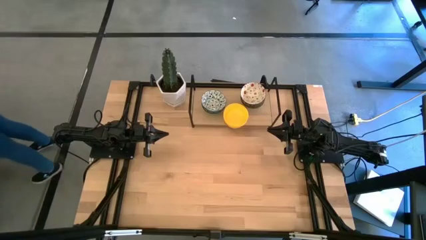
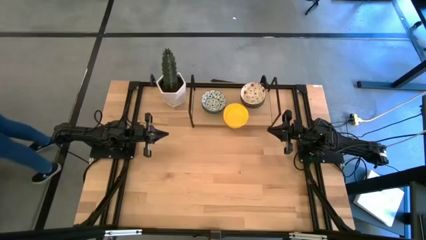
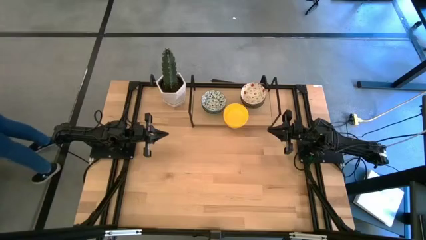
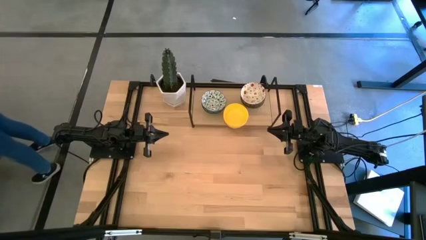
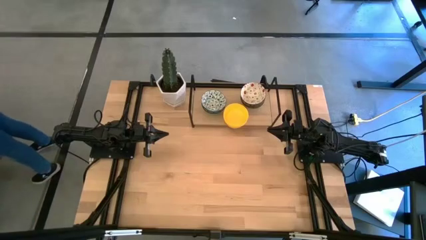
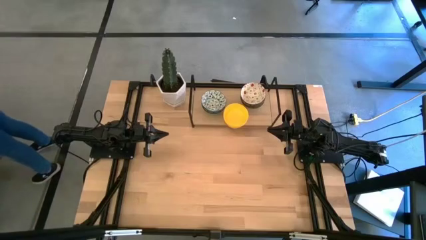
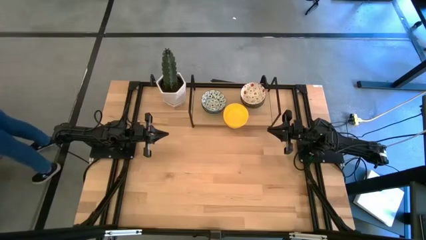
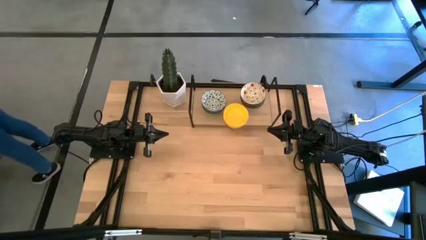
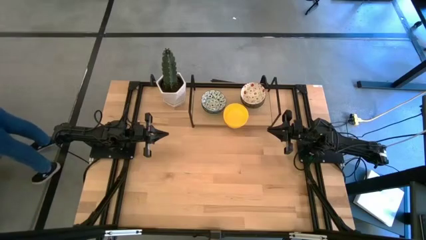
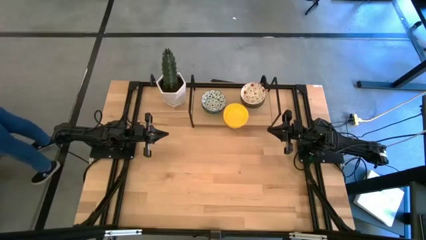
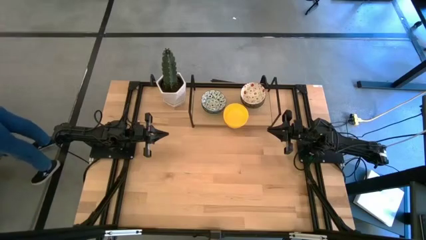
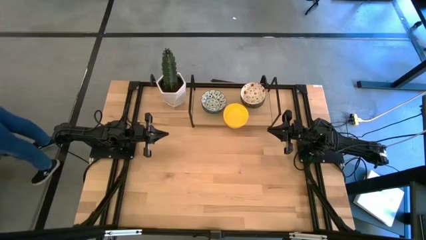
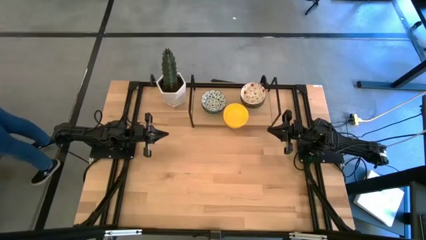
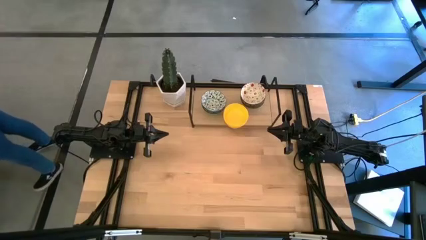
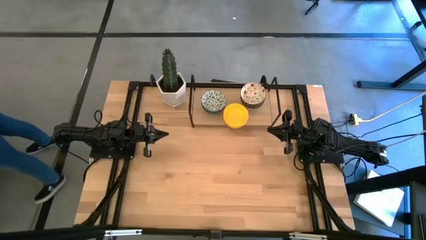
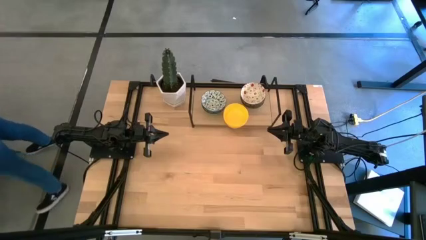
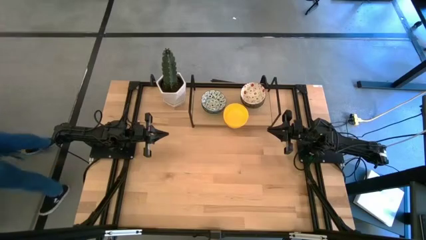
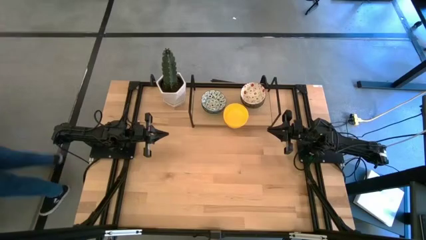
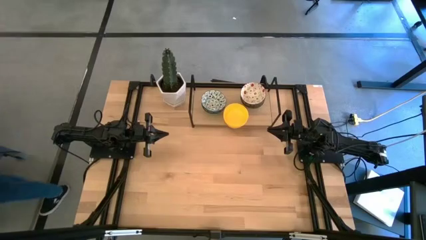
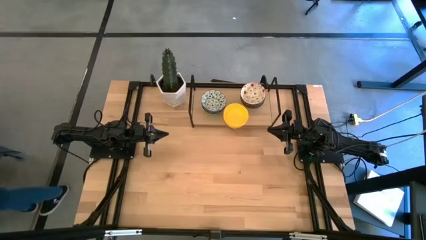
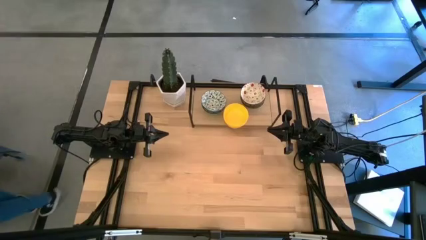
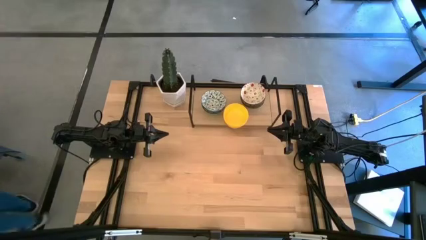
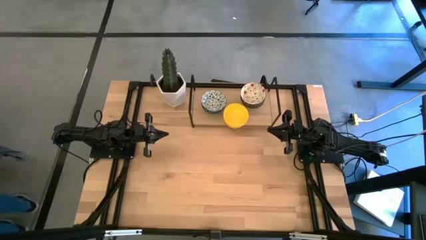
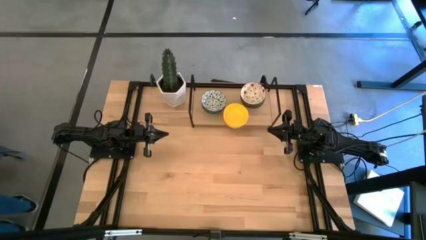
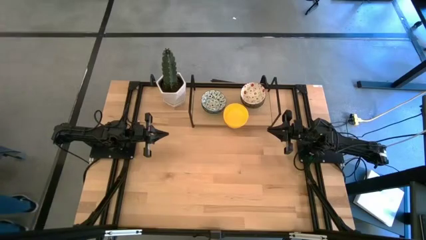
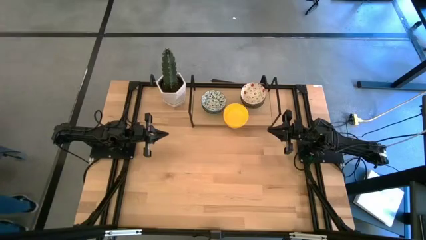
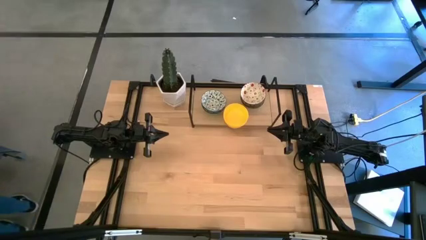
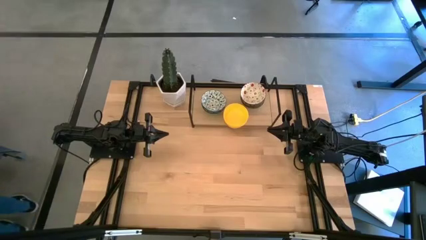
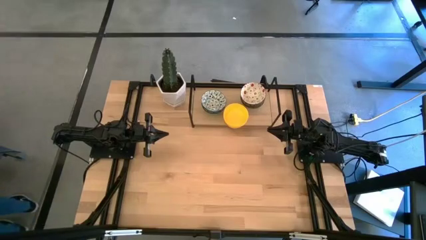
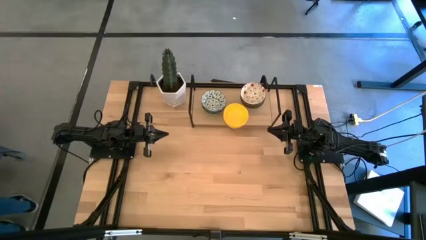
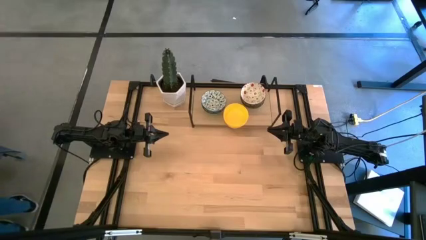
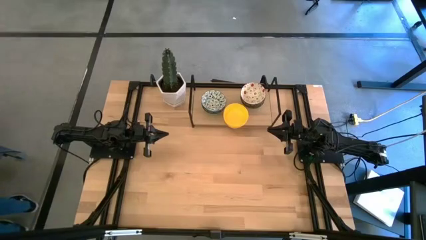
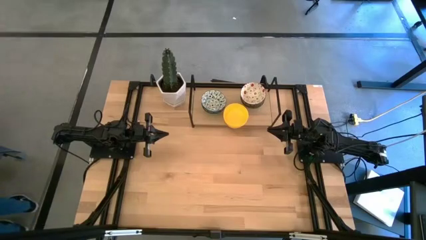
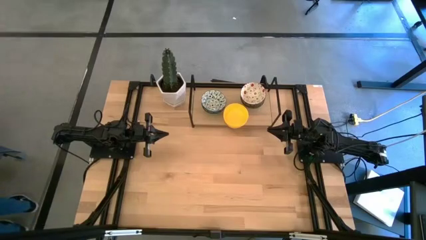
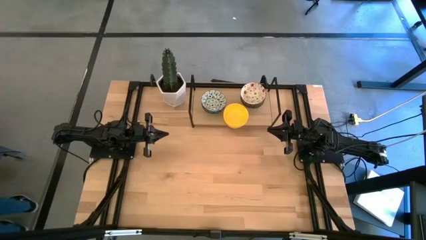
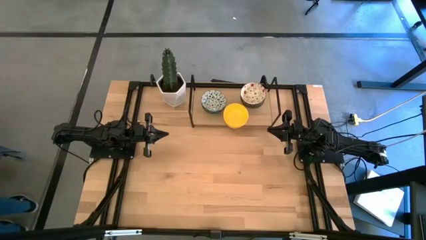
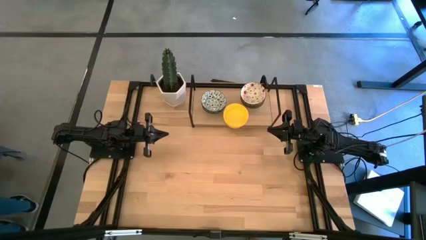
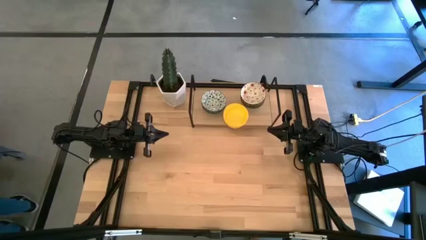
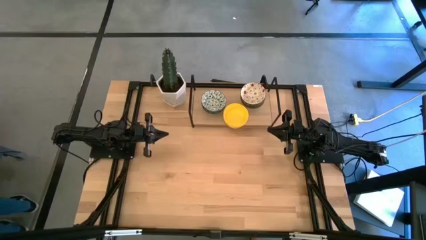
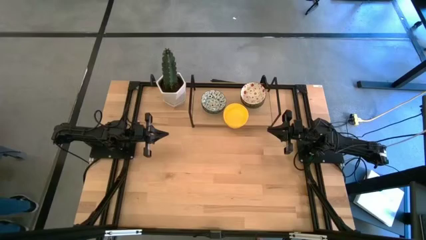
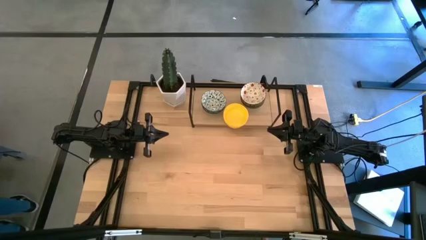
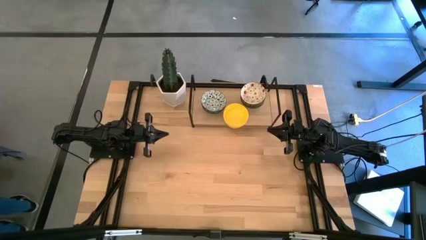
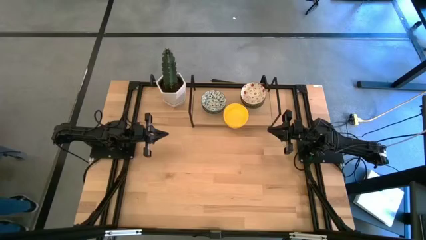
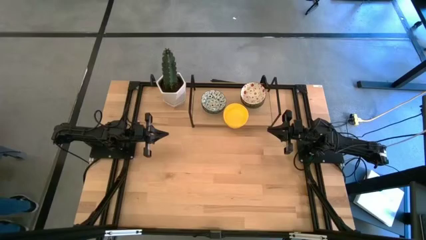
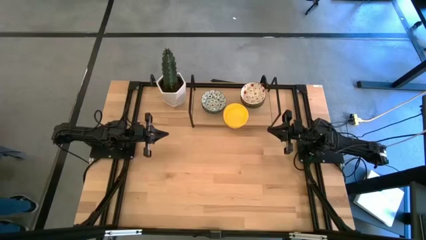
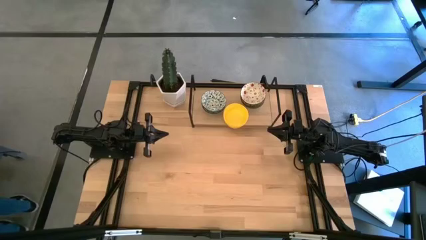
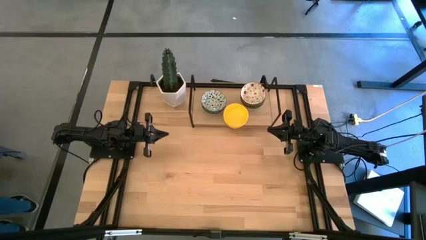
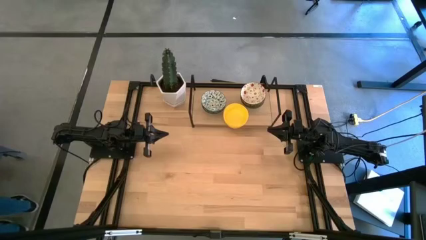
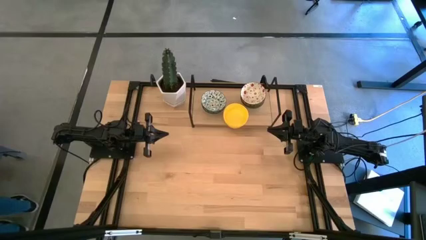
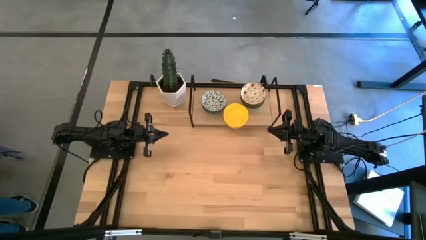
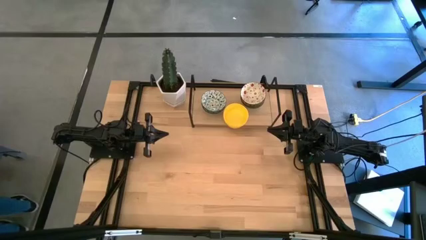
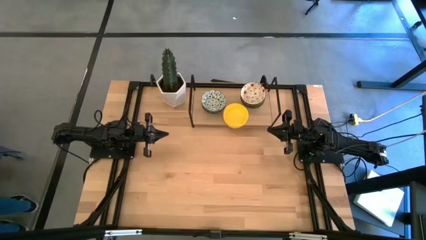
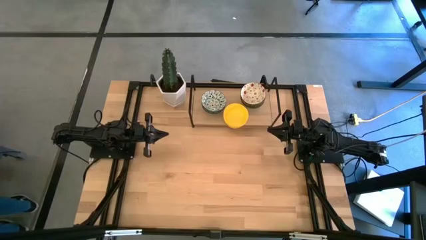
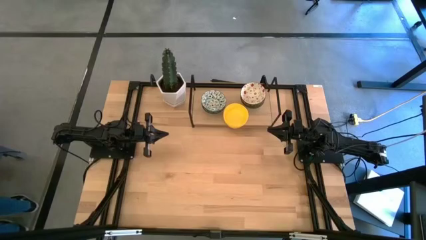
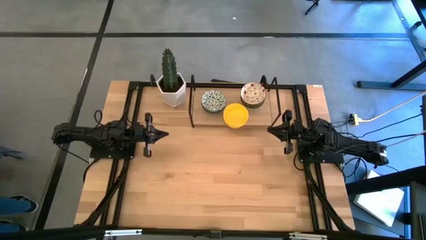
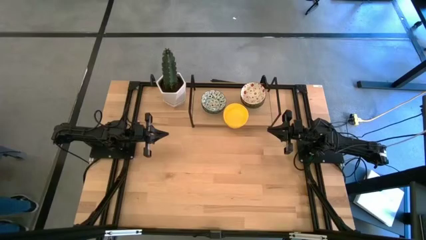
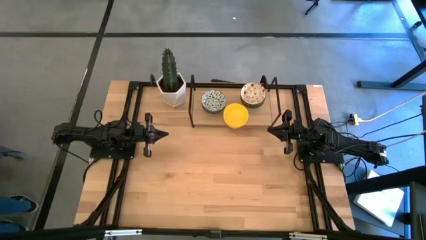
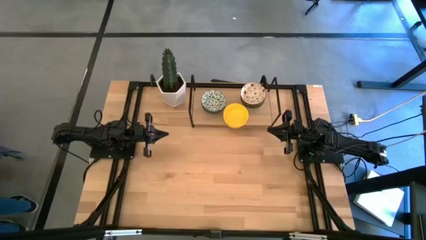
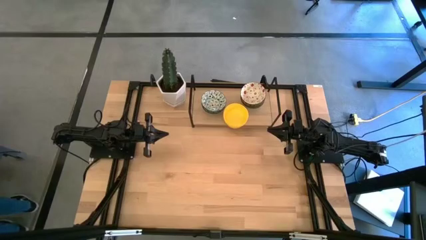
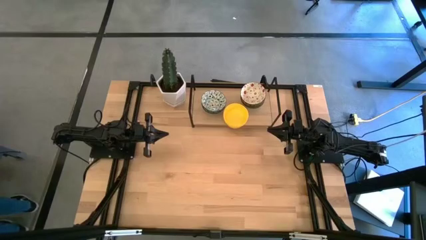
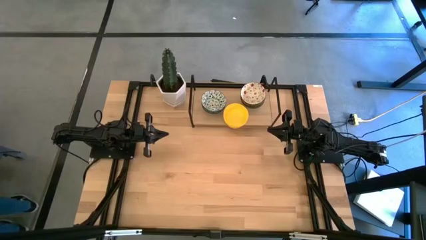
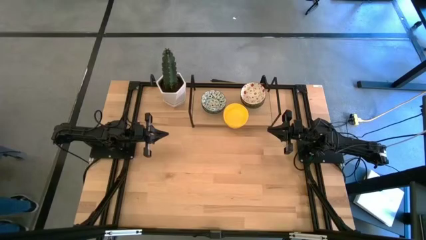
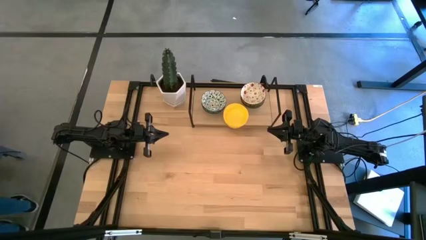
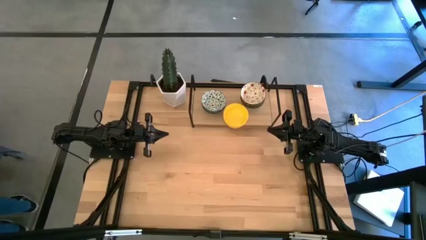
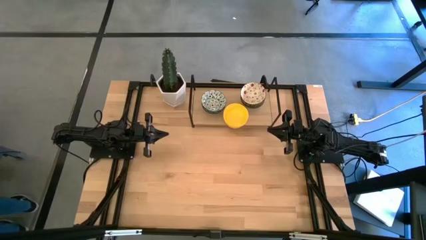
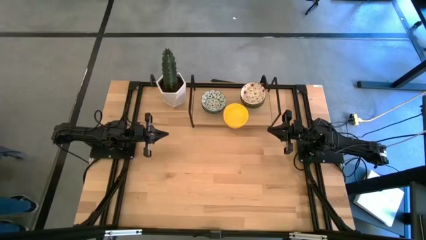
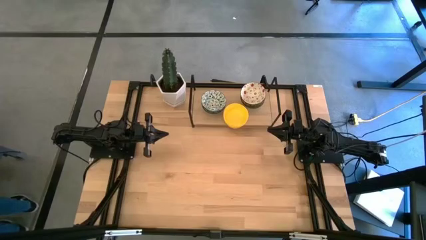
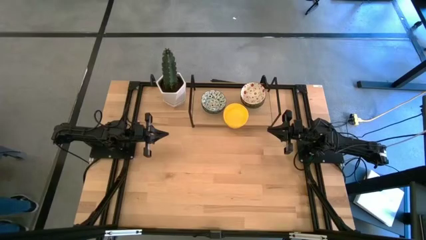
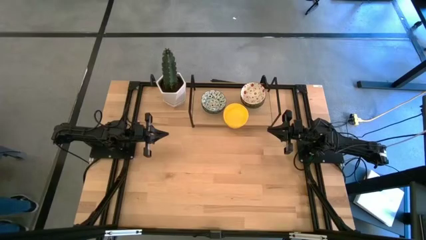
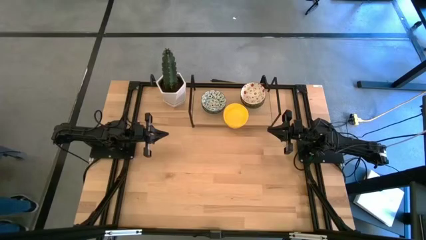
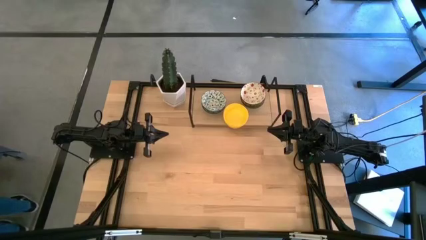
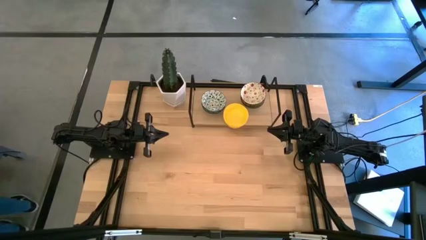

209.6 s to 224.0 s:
Task: Pick & Place Mini bowls
Return to Home Position

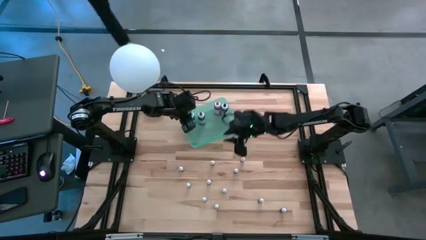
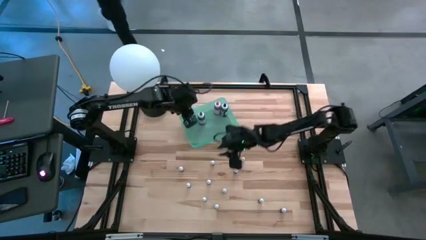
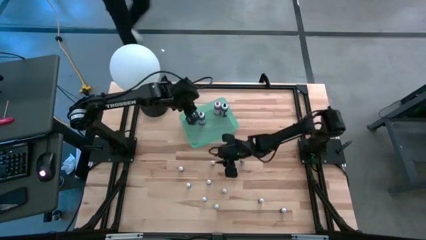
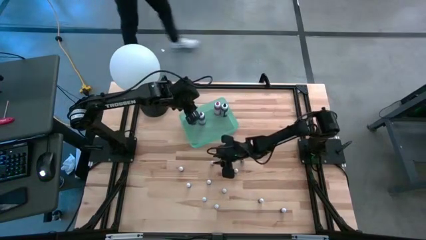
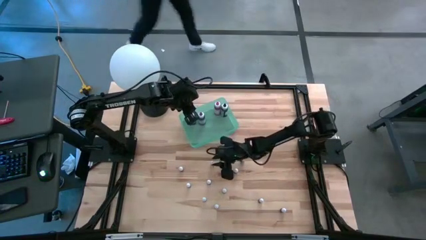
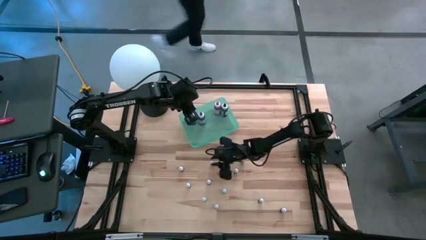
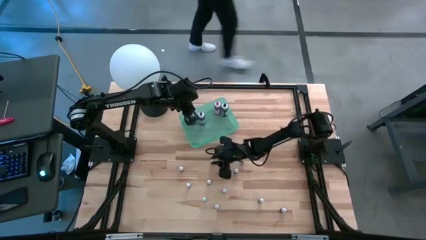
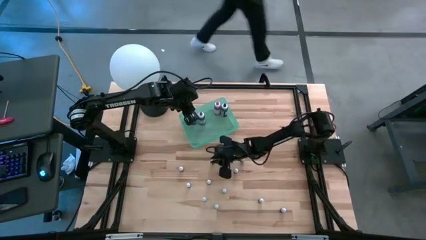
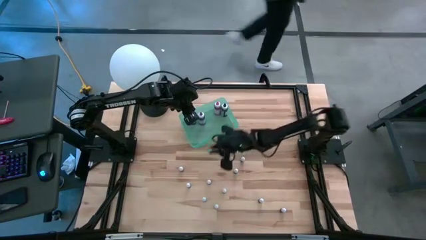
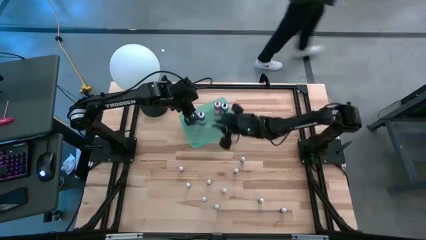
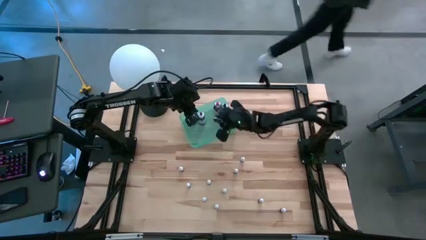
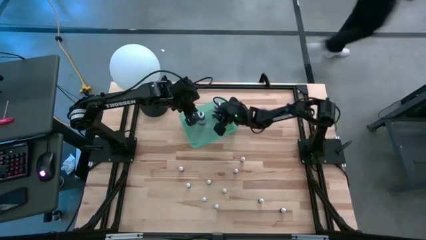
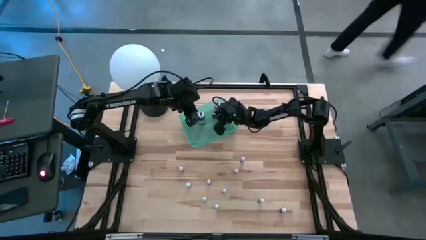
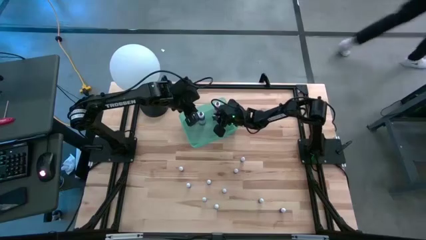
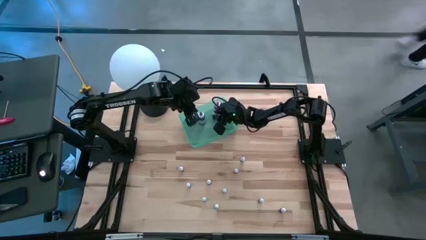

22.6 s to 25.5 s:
Task: Pick & Place food coloring
Put the small green bottle into the blue bin
